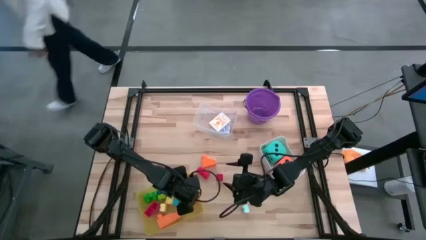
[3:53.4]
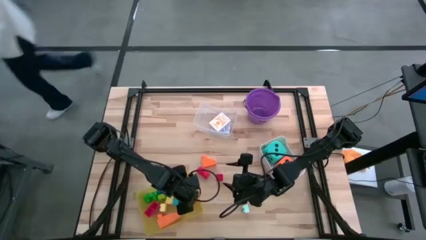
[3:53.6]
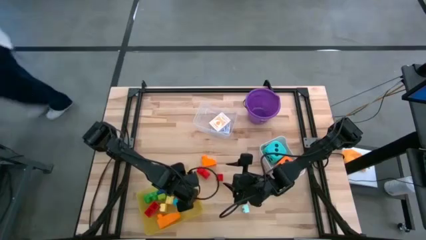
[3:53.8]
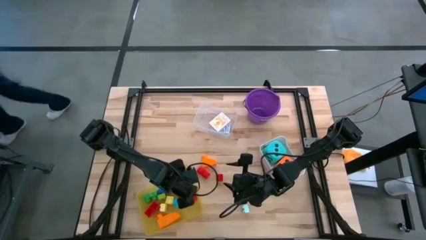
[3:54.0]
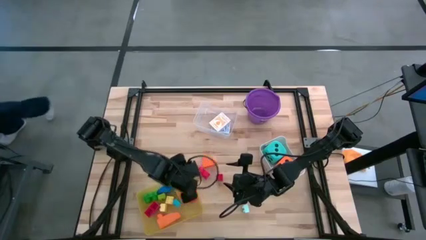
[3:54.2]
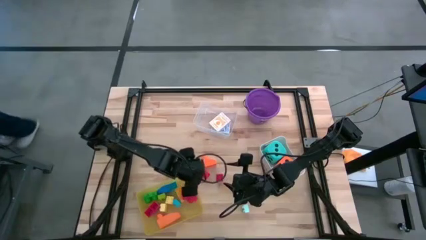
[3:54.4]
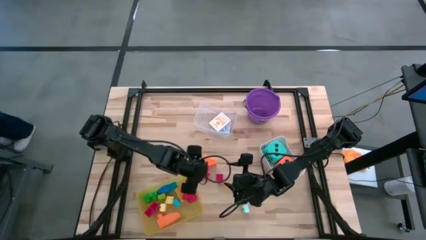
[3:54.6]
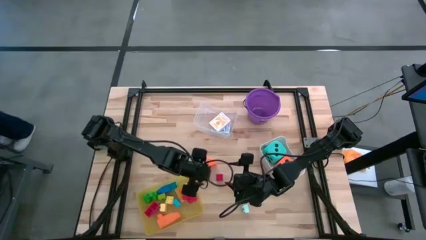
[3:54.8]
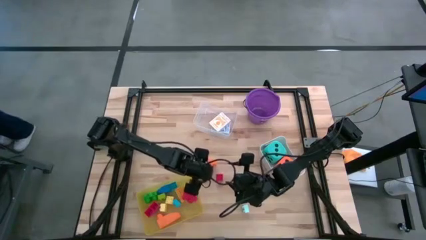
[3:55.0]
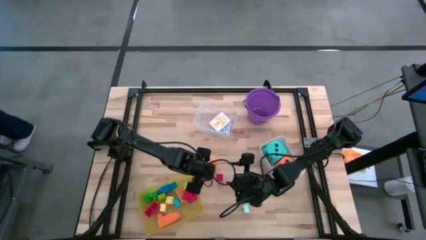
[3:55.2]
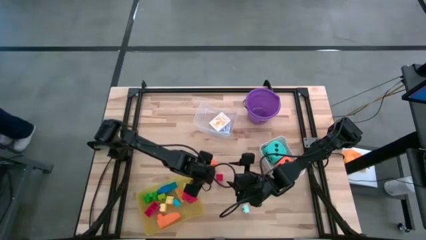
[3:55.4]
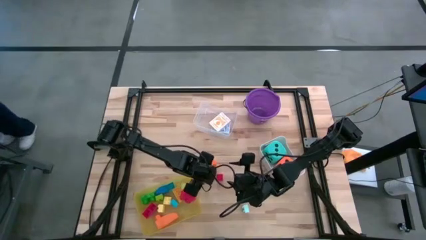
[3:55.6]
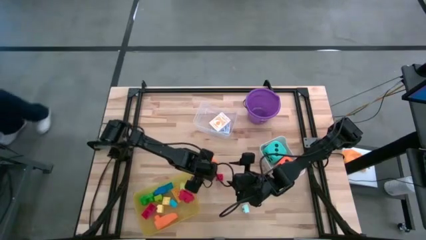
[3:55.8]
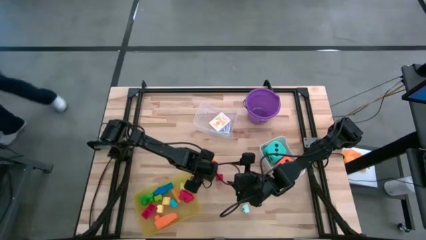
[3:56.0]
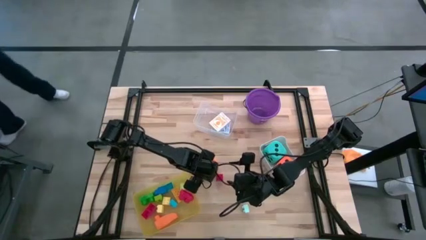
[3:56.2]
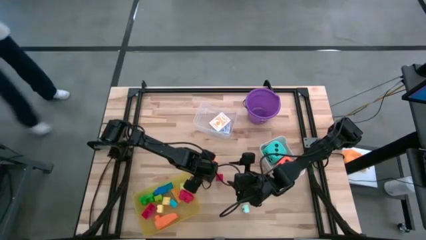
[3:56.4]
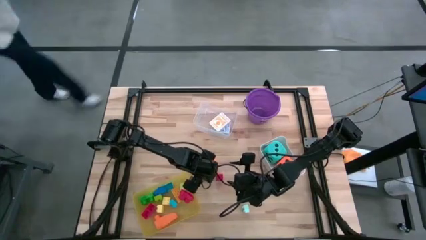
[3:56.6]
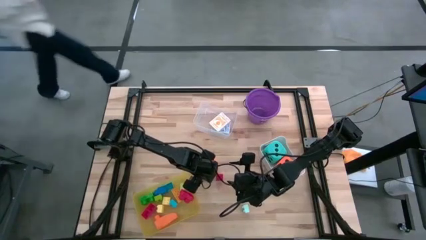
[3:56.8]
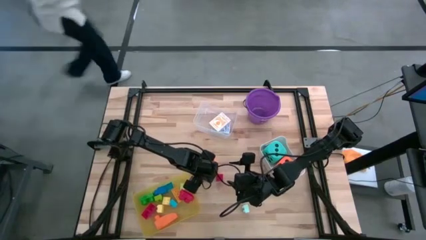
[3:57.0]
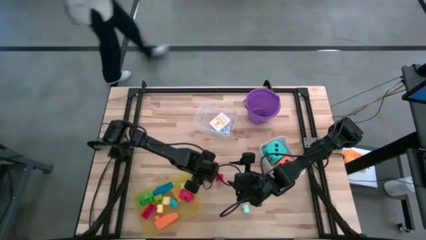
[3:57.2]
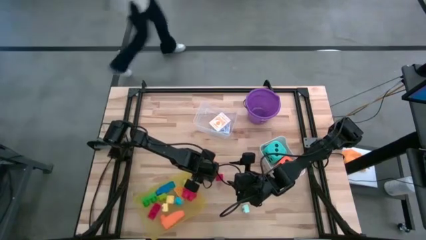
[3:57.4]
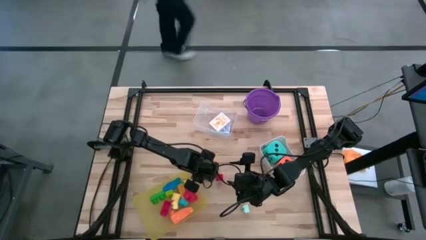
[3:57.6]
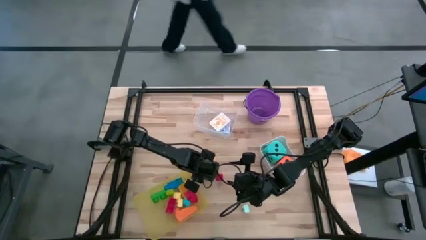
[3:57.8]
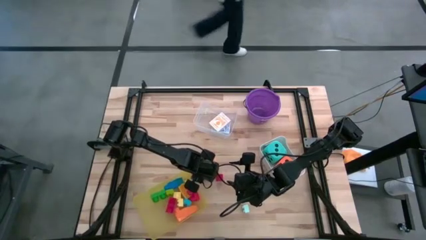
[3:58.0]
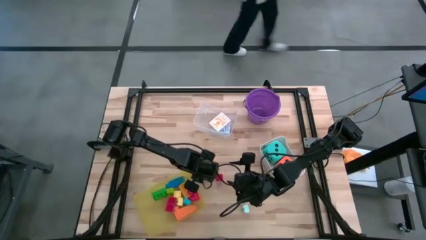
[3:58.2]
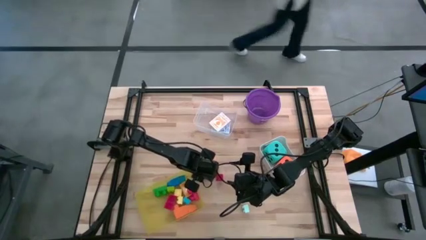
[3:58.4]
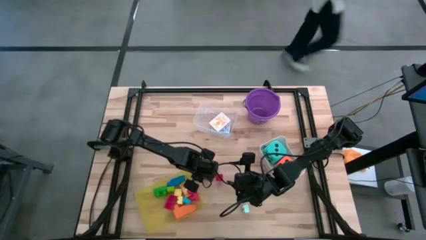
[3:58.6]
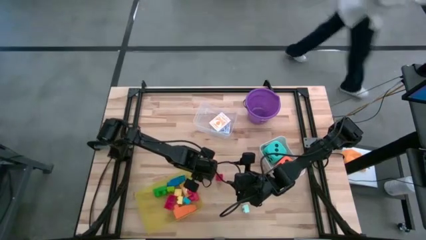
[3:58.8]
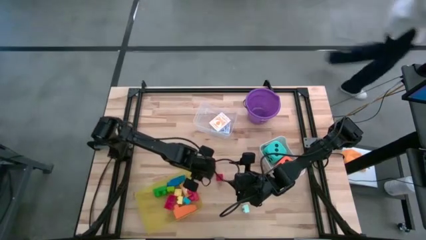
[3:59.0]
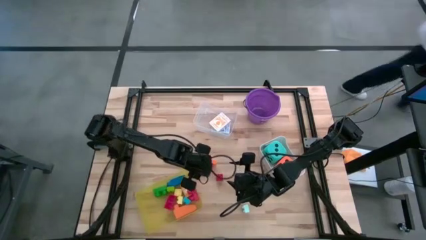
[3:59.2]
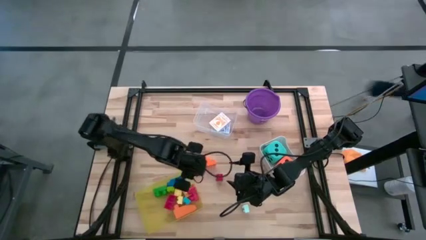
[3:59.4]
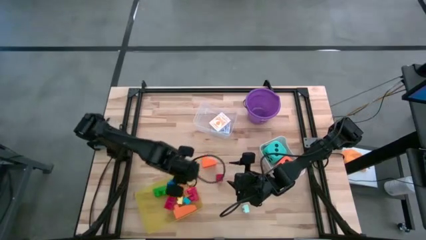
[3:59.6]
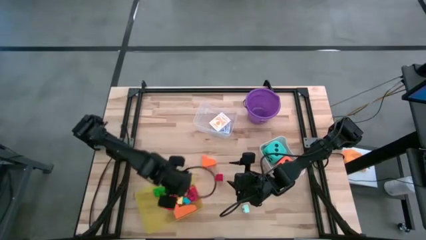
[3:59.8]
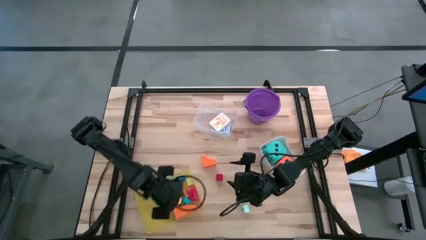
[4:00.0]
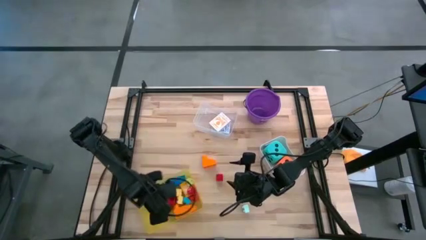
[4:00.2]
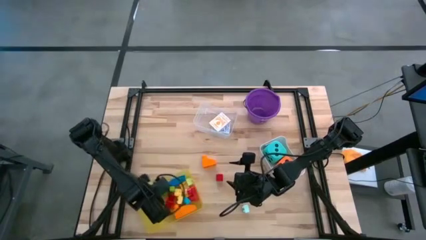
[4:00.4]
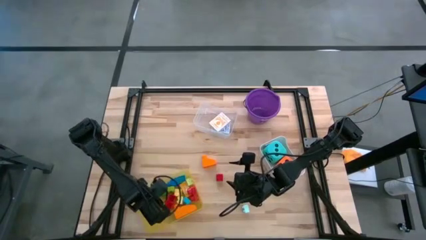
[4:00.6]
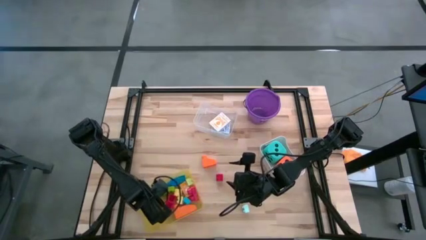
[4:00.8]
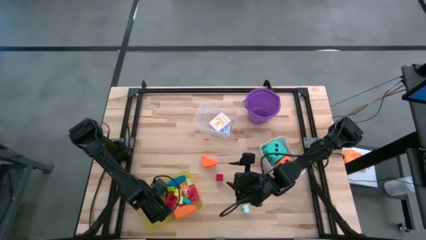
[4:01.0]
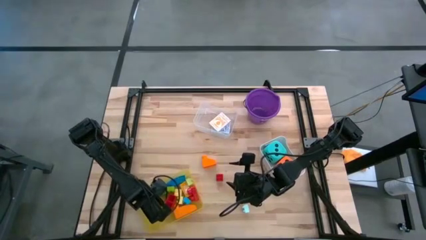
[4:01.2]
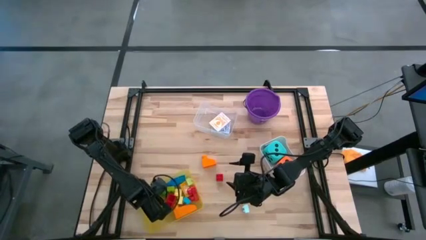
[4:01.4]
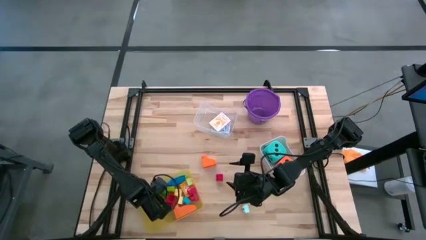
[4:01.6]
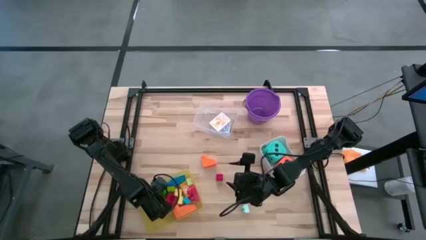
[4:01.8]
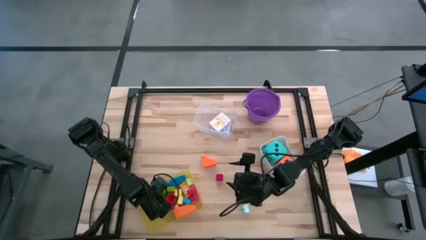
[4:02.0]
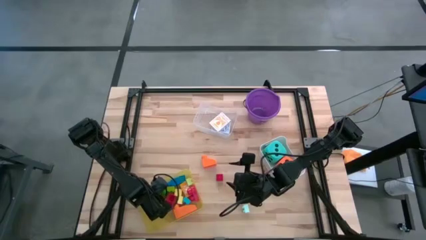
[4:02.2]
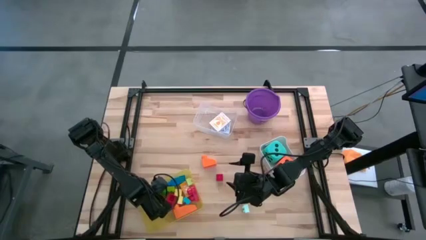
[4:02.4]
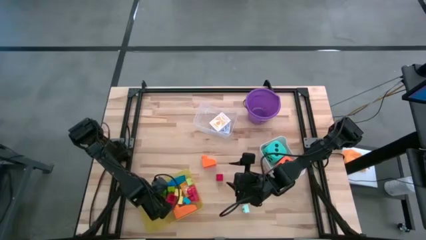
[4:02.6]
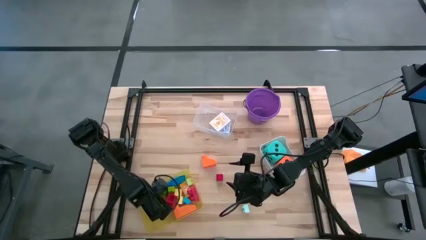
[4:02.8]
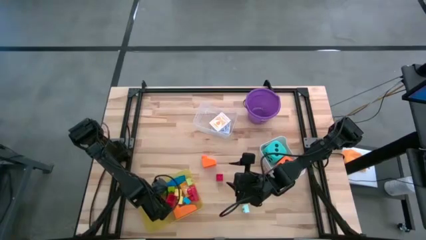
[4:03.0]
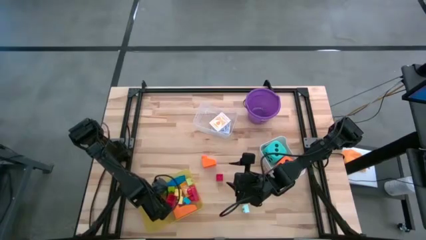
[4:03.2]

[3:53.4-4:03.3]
Task: Pick & Place Toys
Put the red game piece into the yellow bin
